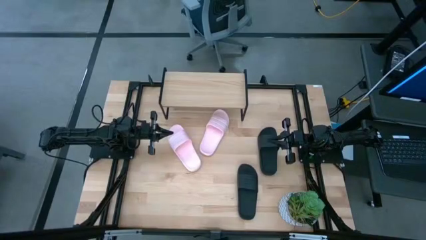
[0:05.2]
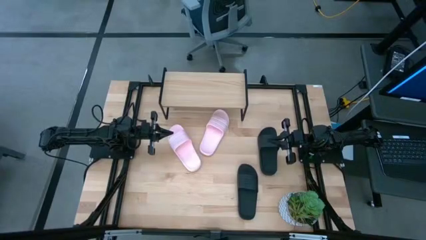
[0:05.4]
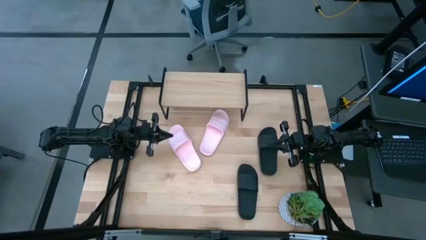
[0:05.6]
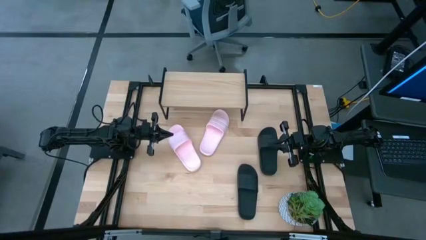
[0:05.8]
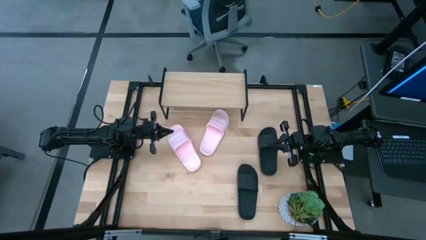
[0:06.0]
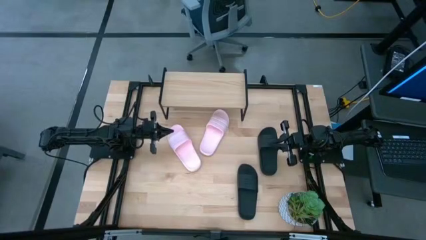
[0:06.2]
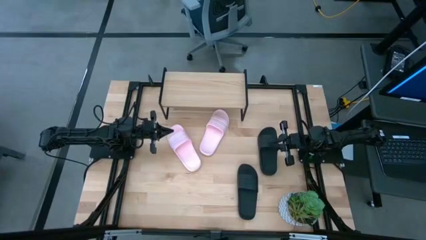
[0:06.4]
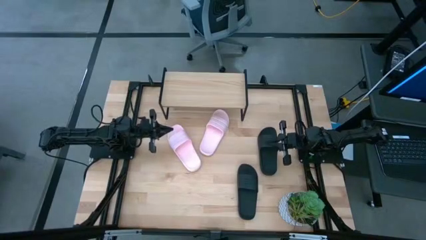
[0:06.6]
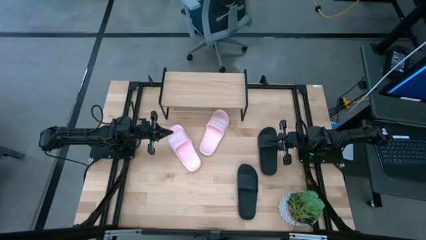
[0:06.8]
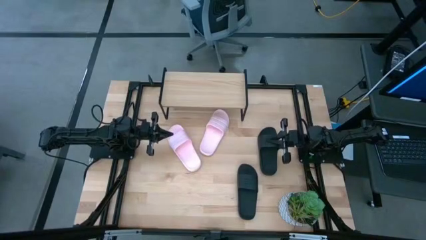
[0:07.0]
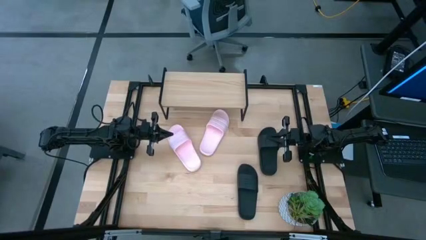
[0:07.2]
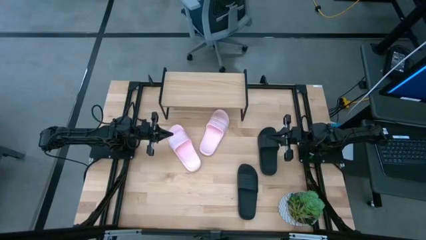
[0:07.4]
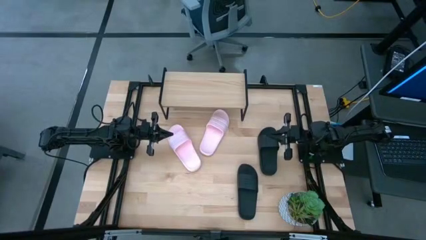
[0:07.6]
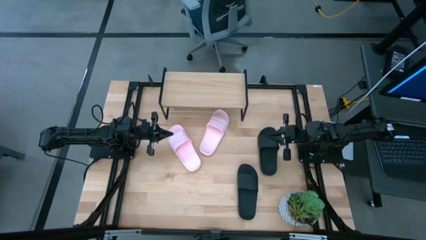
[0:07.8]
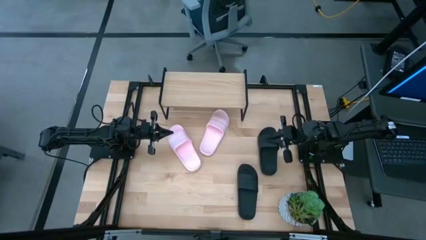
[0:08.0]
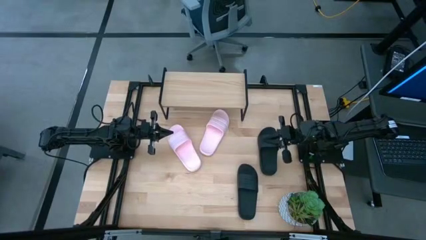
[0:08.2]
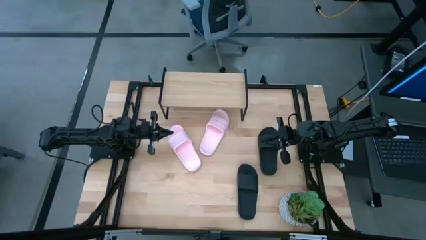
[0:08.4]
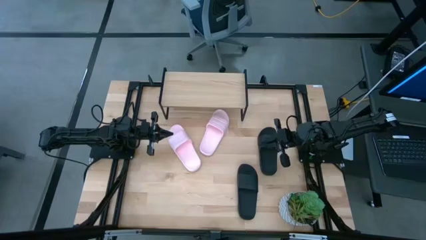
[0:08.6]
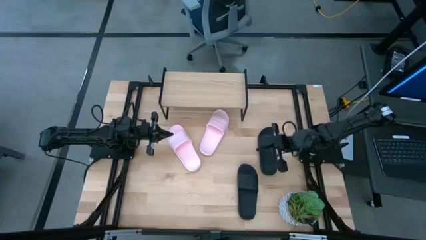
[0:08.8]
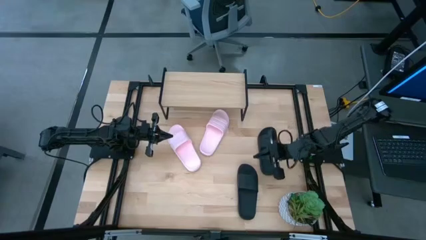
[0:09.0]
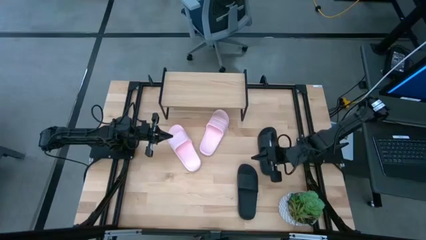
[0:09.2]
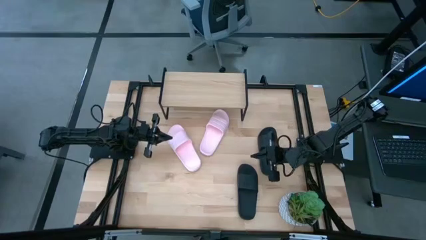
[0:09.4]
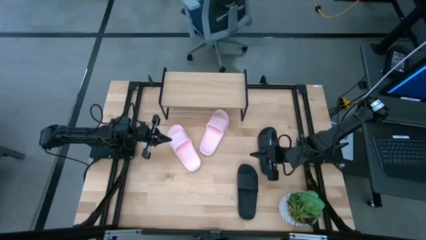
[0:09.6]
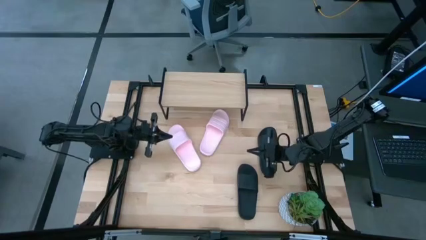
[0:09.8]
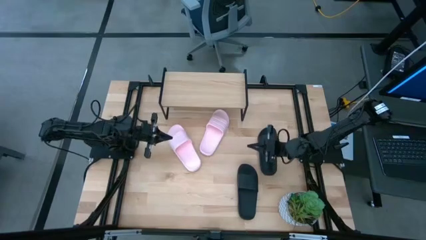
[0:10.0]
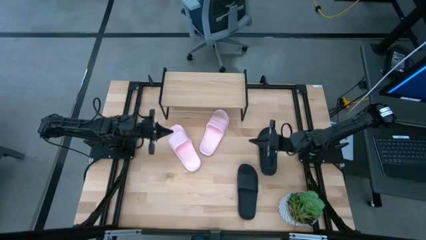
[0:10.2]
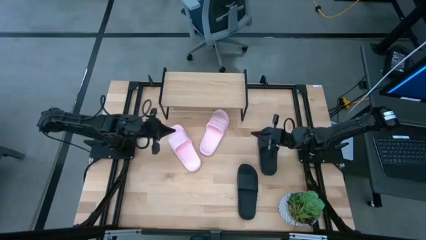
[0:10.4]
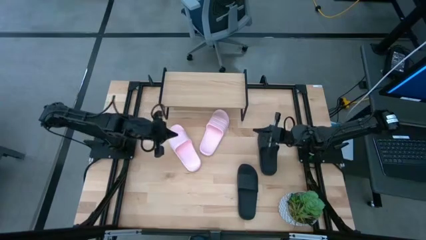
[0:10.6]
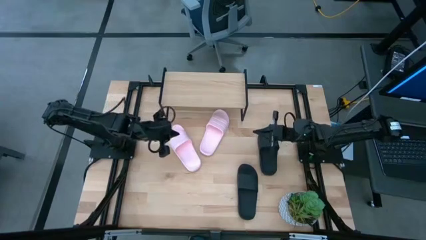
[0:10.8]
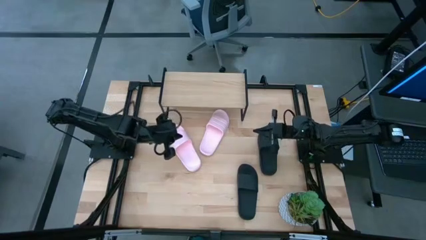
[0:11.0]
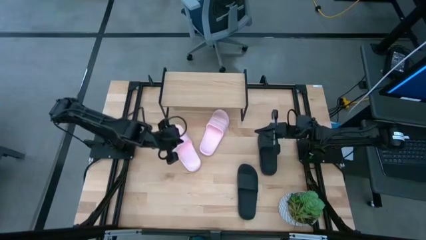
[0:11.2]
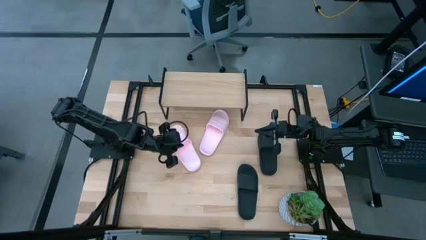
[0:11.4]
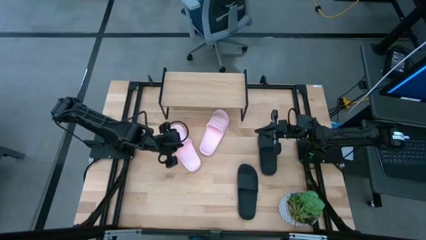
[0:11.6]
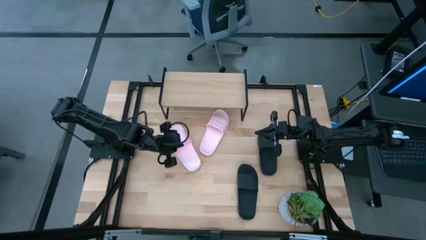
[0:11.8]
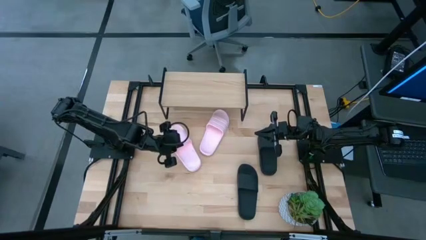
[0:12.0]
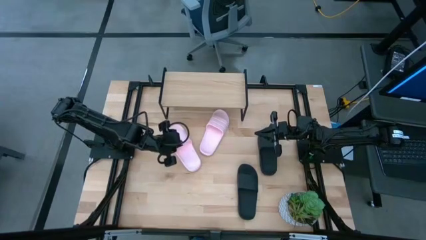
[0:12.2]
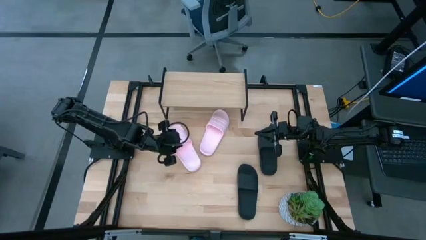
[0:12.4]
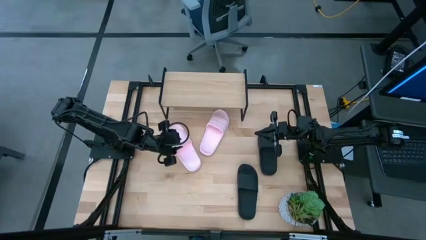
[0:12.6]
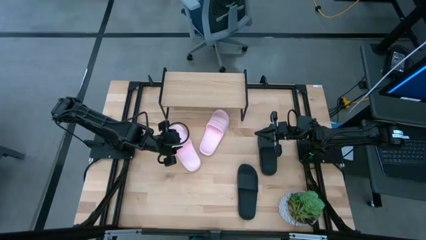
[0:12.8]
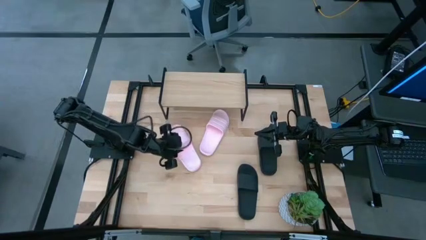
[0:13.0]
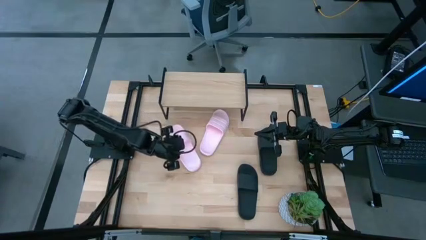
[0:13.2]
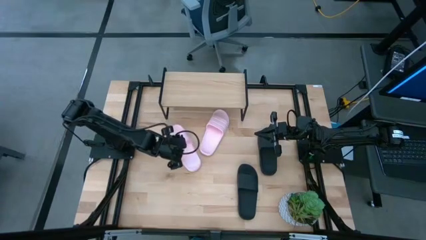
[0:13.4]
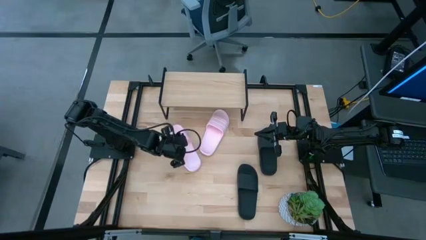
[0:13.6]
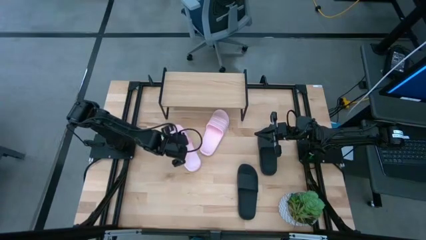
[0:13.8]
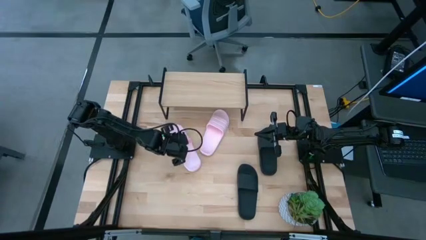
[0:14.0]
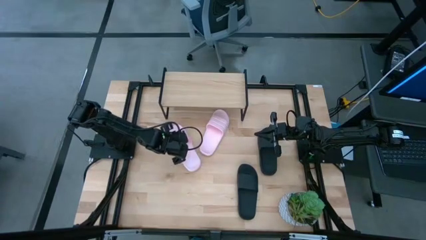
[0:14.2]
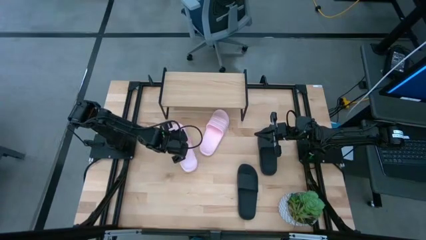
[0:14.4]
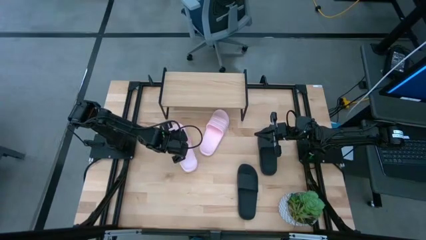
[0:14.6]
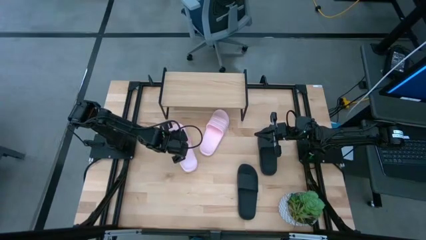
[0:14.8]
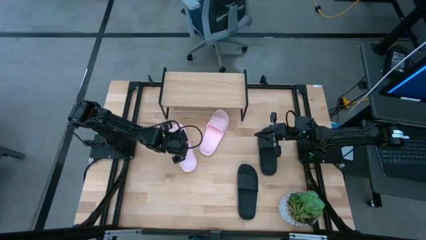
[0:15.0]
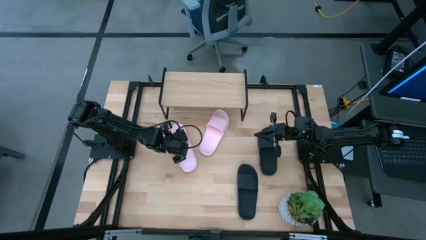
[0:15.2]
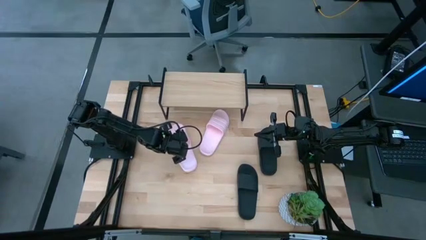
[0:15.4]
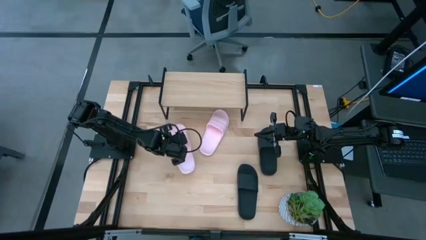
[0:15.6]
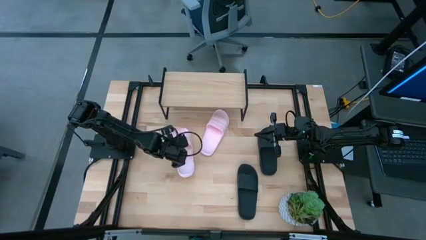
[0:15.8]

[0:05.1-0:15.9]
Task: Pick and place slides into the shelf
Put the left pink slipper on the shelf
